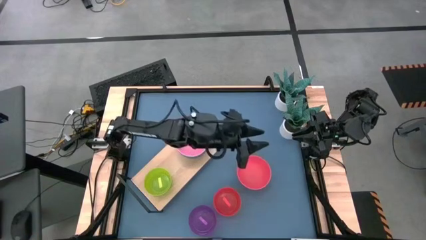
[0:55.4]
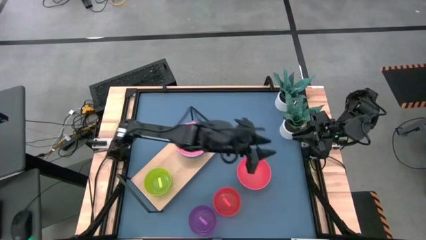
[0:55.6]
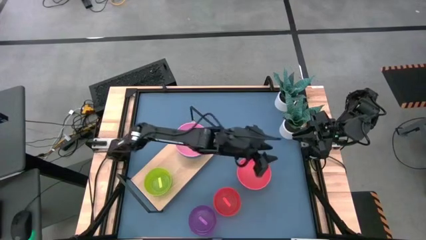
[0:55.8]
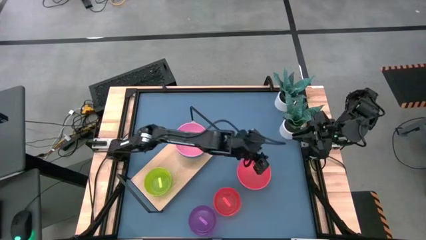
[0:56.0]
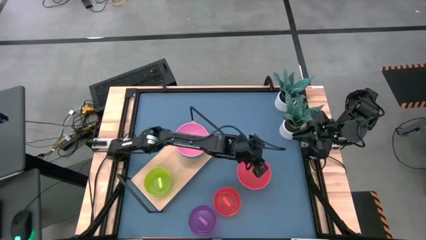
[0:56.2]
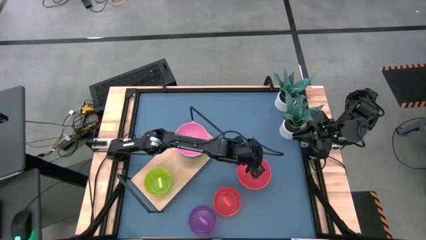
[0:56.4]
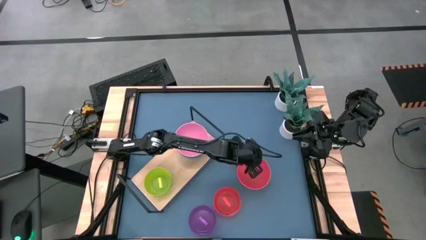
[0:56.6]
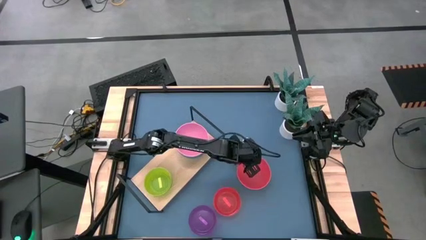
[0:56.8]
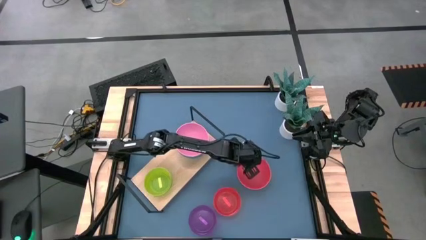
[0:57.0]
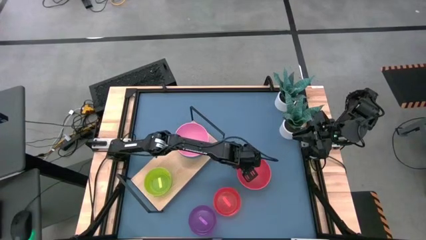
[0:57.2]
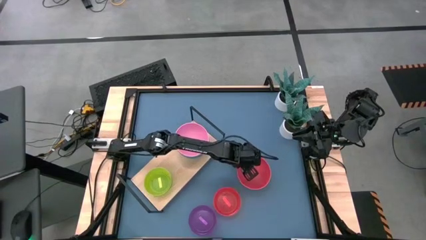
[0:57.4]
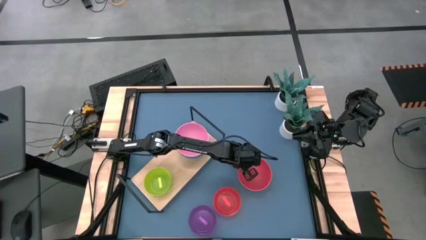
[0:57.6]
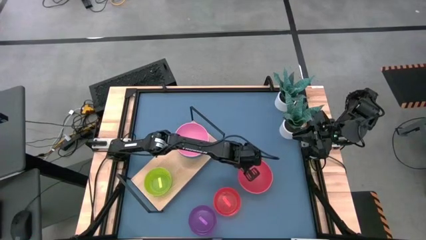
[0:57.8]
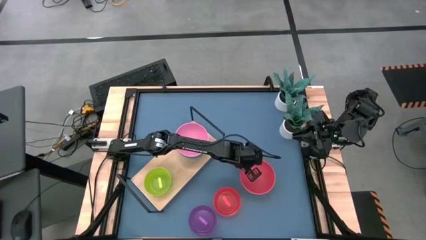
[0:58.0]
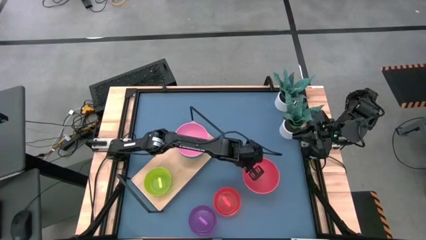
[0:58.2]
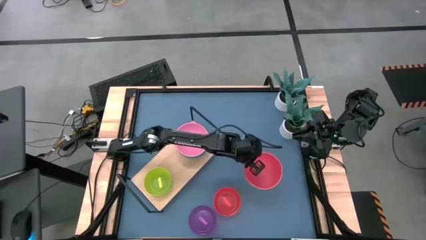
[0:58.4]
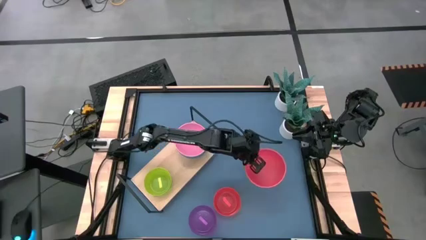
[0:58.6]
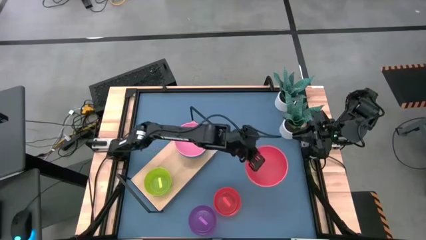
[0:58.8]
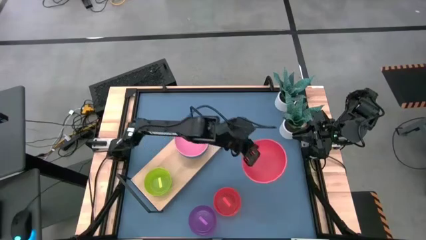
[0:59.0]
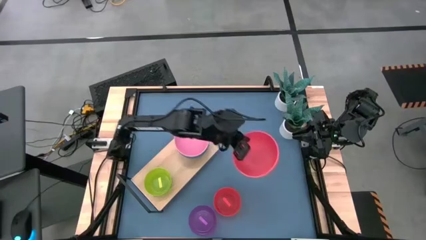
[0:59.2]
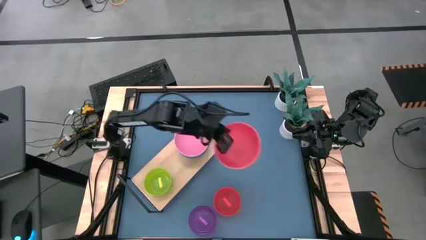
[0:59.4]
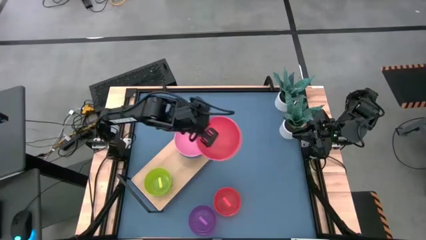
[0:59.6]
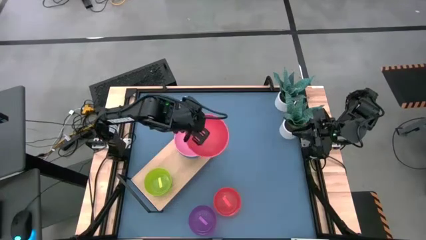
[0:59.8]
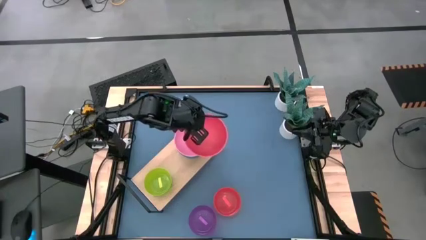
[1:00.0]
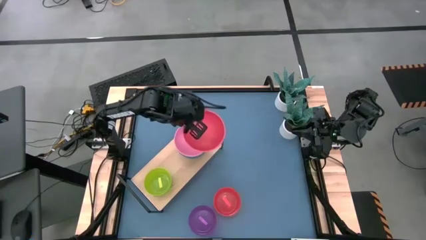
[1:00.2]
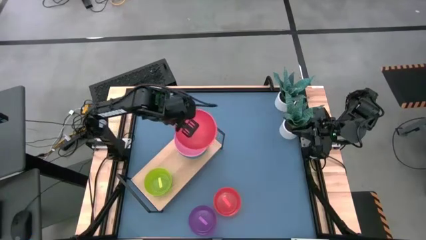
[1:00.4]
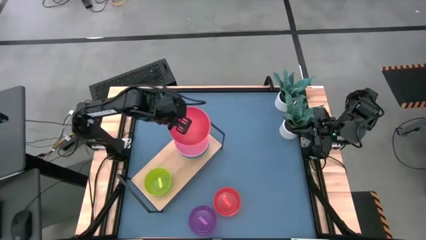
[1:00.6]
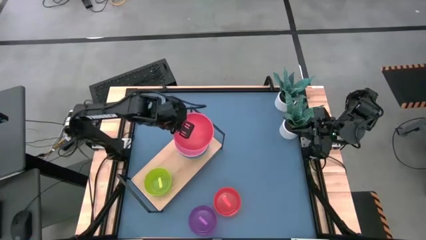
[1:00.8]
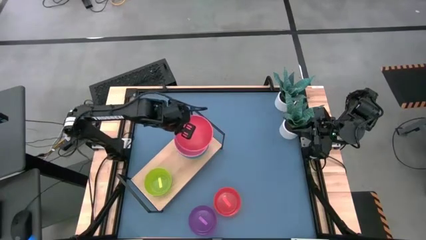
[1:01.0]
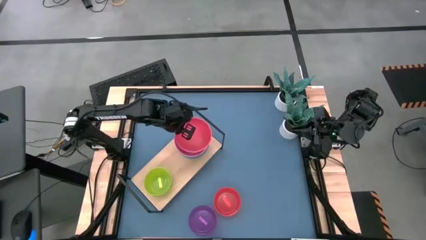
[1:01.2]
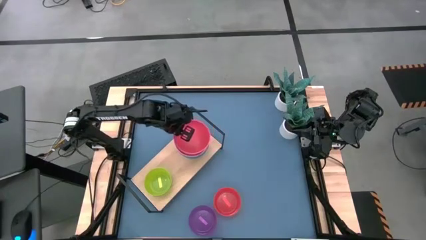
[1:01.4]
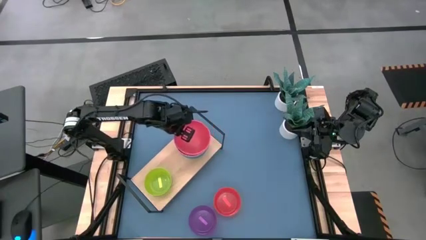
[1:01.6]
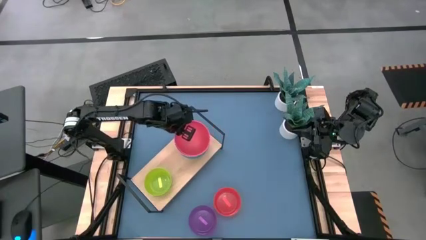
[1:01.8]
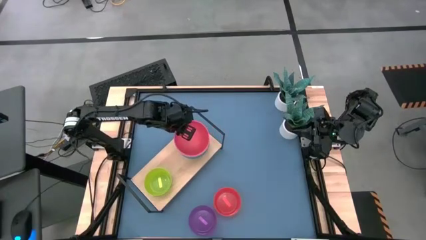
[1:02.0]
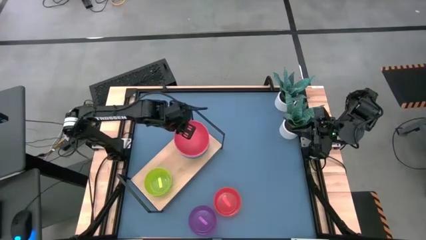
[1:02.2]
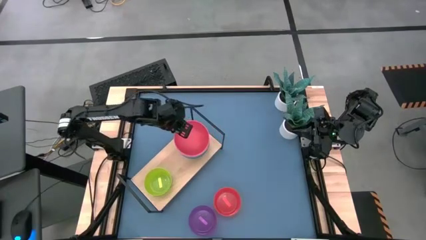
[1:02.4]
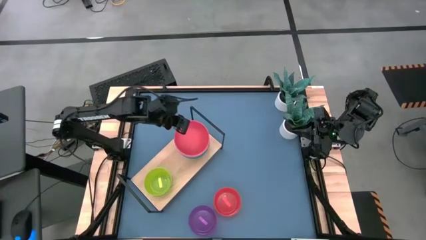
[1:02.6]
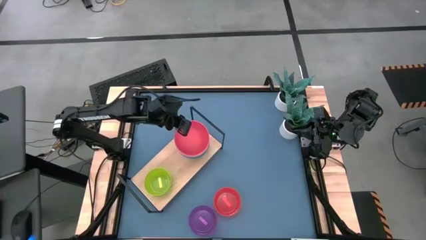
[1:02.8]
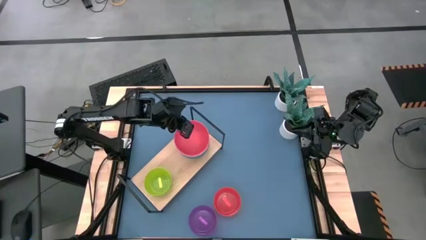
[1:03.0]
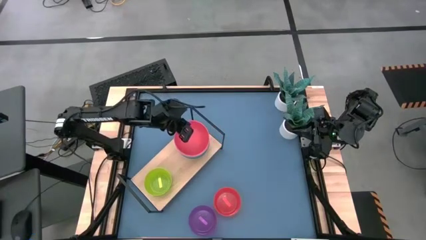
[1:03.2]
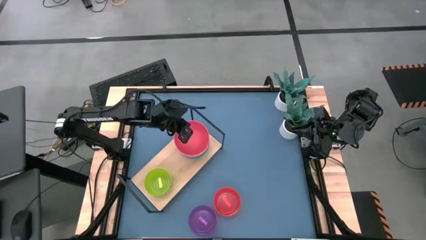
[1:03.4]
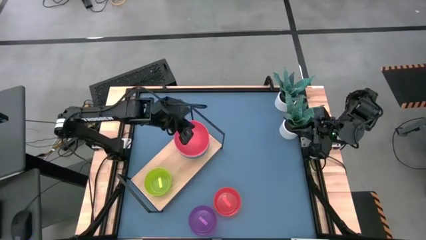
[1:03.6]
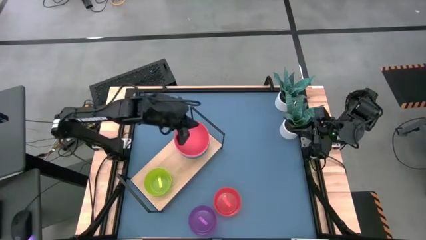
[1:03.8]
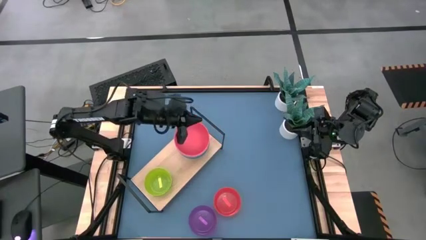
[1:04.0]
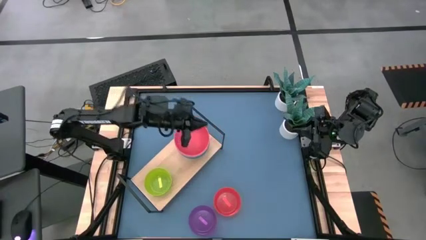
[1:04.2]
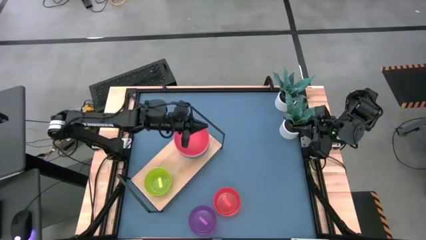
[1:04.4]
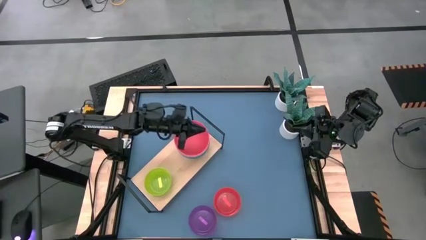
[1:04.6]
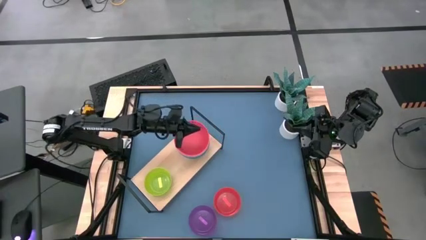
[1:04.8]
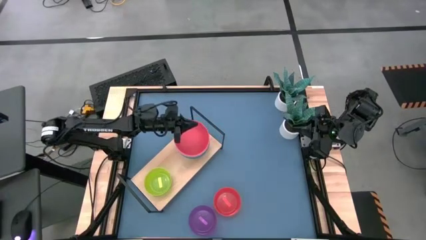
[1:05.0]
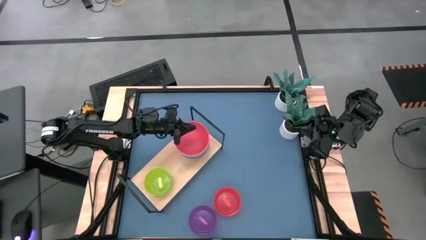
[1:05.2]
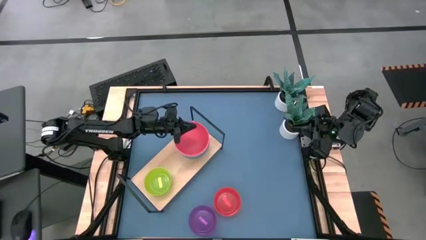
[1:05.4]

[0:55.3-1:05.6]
Task: Place and stack bowls onto a shelf
Stack the large orange bowl on top of the pink bowl on the shelf

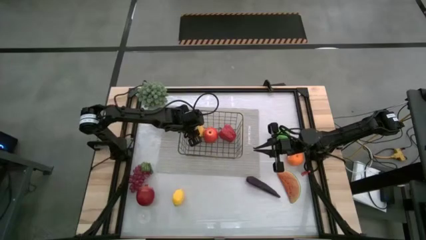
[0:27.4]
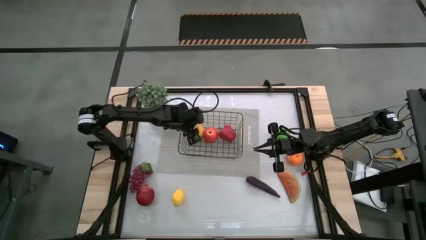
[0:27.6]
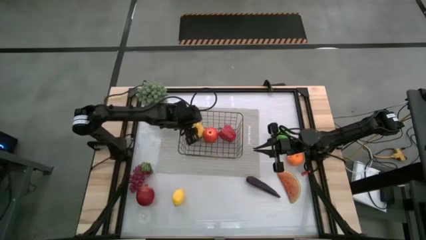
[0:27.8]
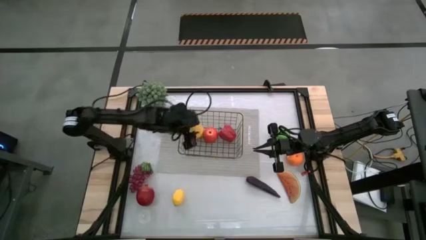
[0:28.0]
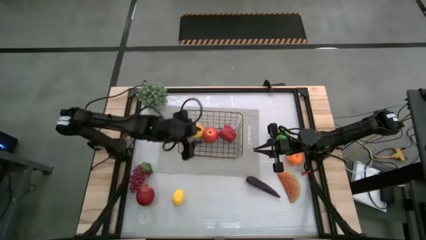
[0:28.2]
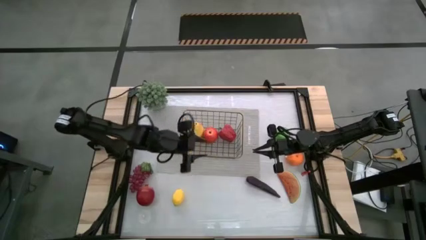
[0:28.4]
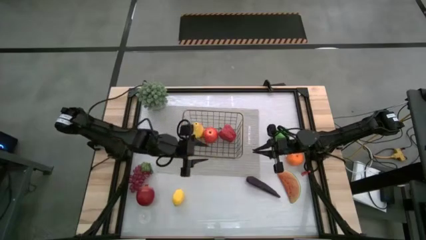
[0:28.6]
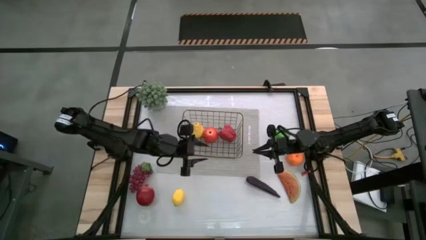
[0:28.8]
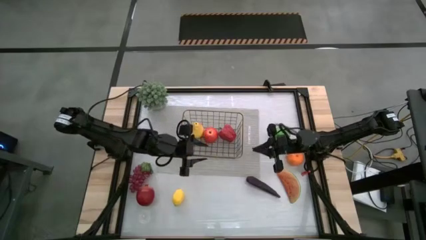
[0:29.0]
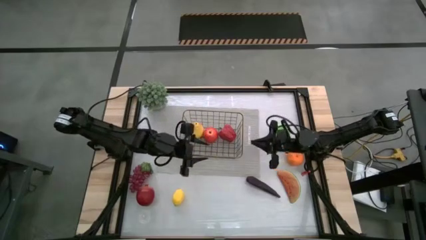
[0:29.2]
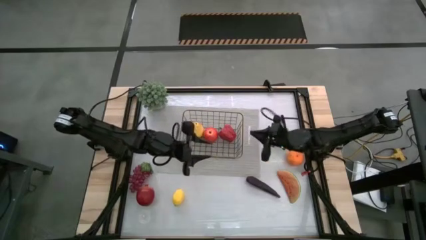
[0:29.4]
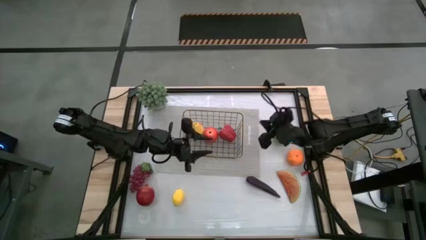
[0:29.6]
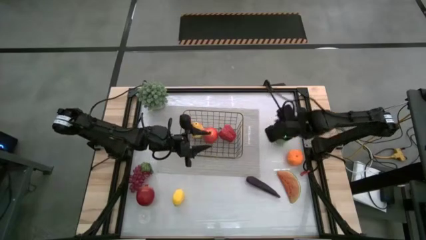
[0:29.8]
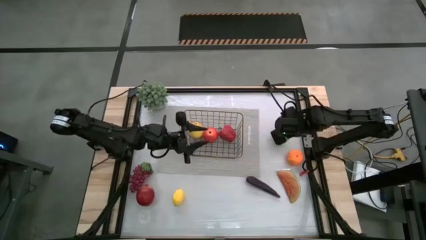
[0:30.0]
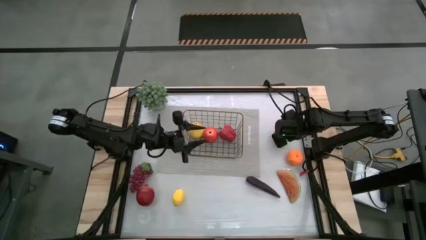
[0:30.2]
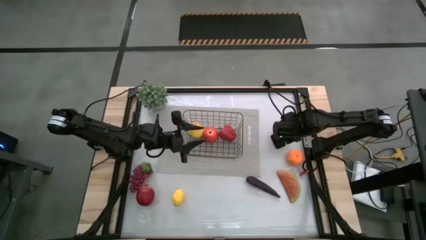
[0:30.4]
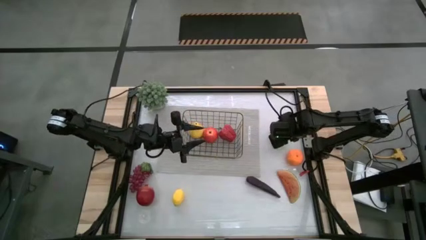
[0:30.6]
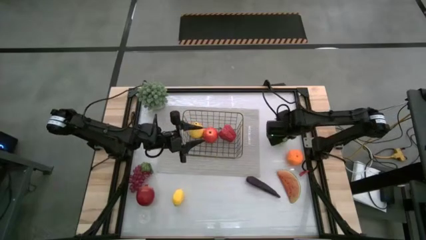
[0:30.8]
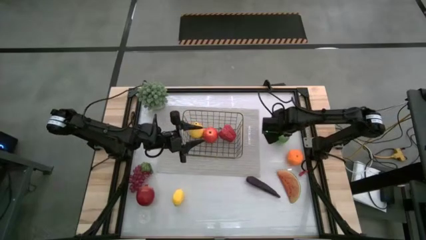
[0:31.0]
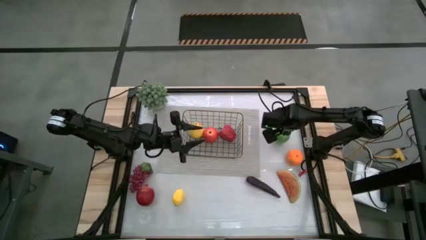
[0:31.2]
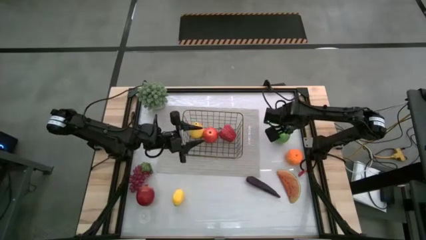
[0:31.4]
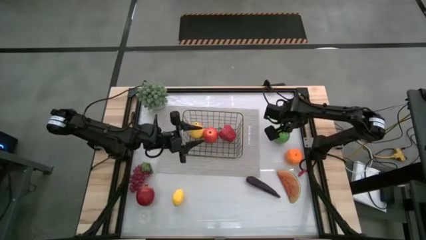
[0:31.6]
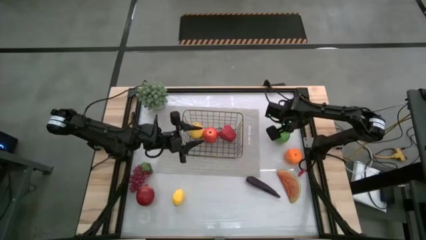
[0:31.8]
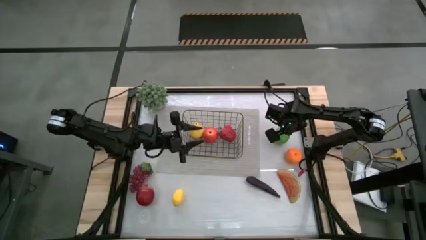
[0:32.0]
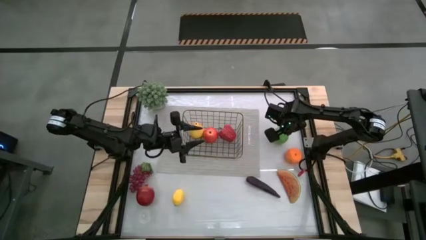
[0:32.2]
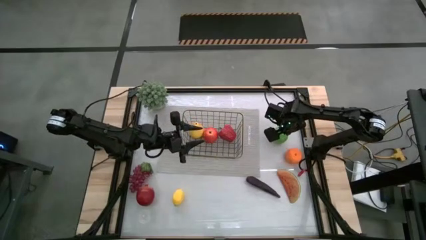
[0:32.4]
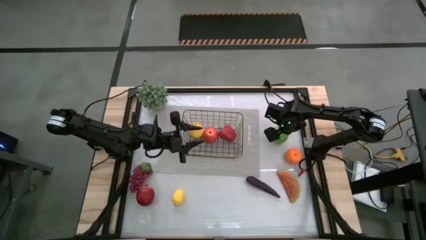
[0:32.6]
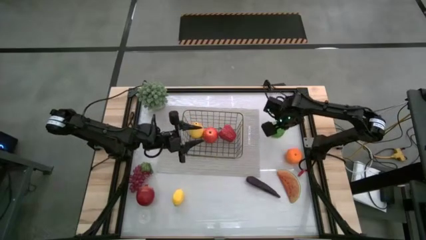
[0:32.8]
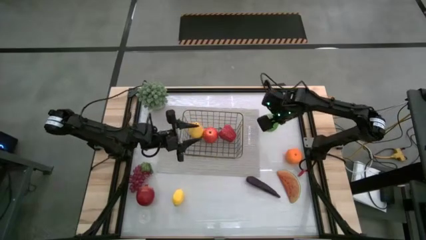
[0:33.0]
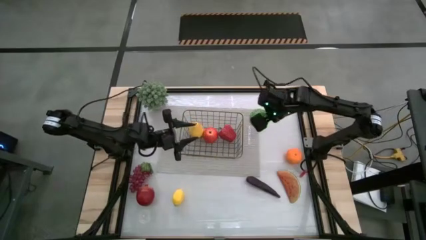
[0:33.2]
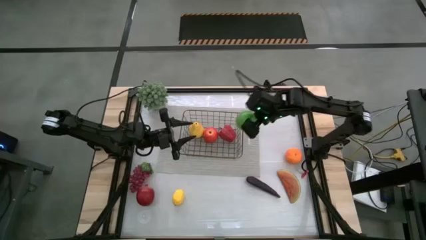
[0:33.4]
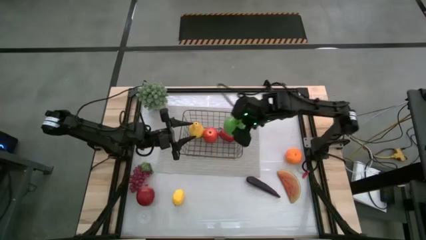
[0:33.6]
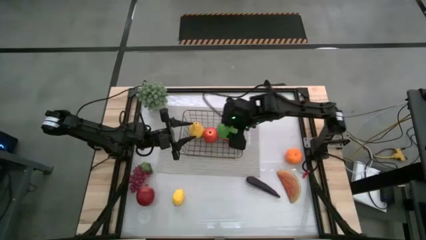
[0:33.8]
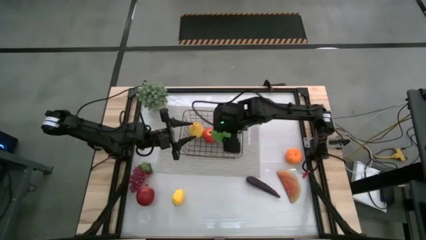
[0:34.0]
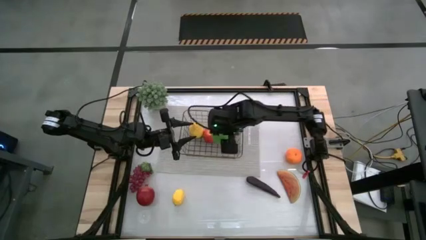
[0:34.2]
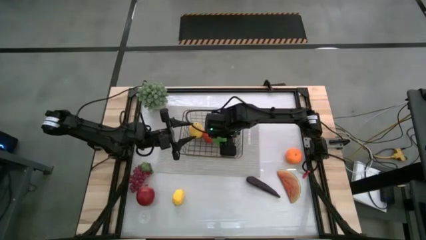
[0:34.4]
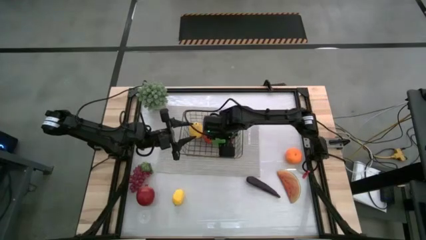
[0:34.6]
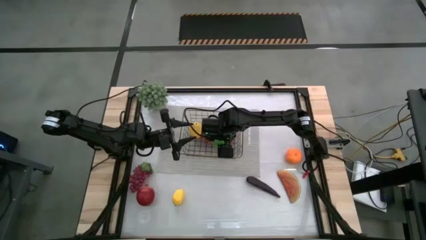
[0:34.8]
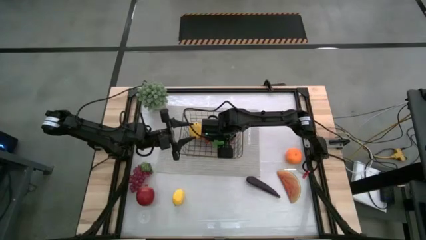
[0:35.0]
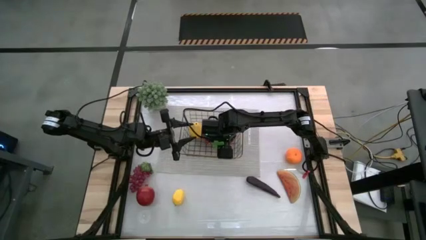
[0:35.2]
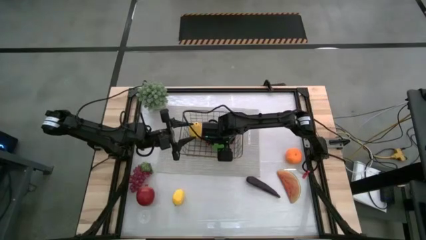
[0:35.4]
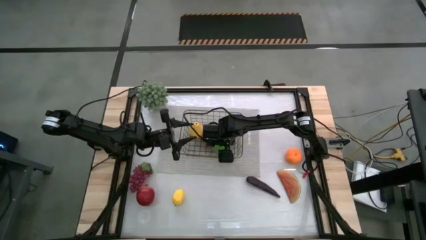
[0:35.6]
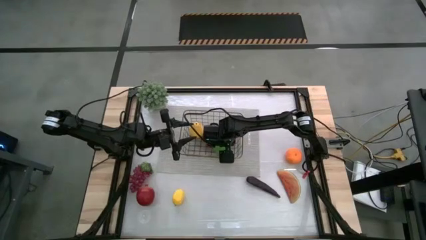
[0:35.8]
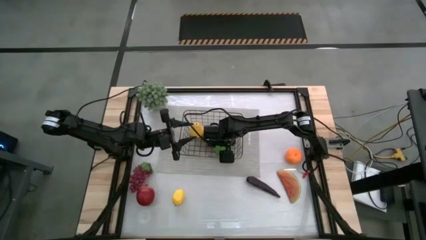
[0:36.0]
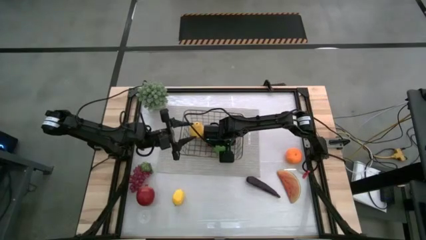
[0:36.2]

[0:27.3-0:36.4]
Task: Build produce basket
Put the green apple into the wire basket
